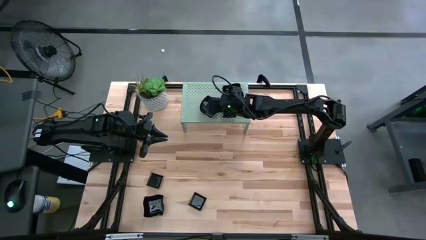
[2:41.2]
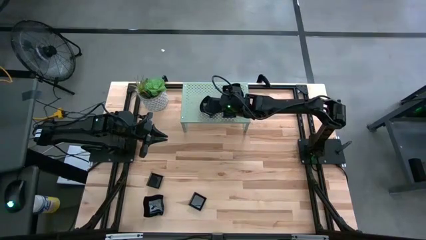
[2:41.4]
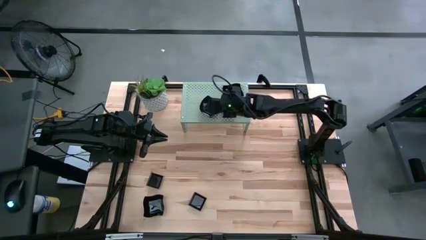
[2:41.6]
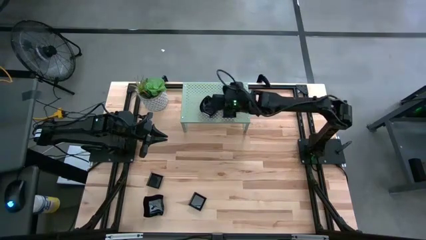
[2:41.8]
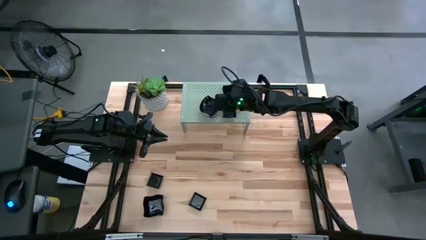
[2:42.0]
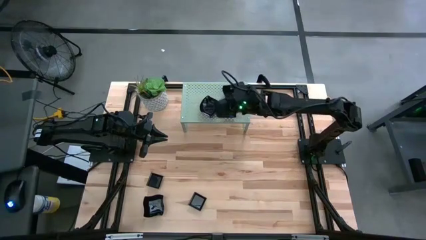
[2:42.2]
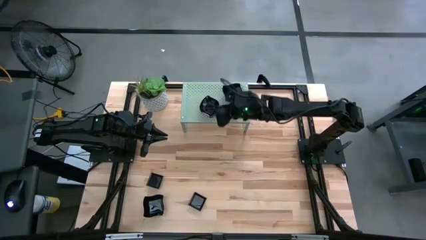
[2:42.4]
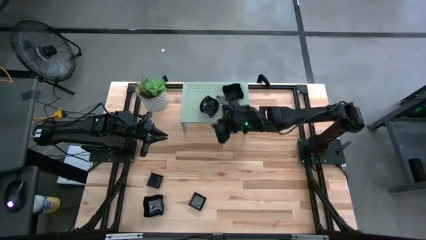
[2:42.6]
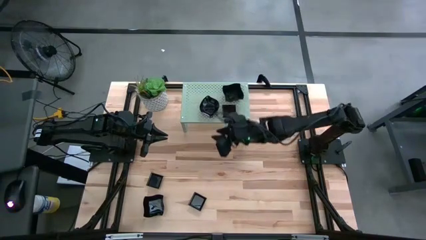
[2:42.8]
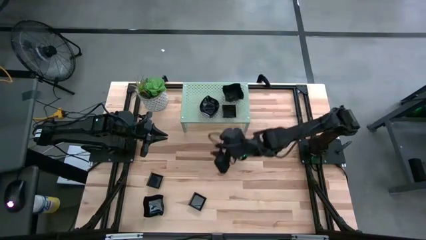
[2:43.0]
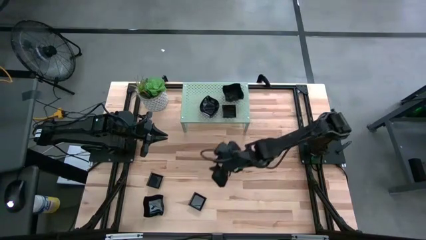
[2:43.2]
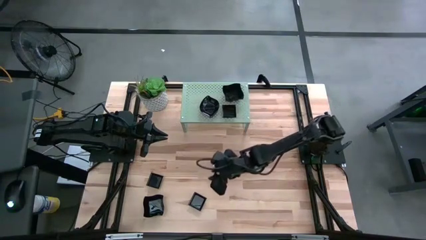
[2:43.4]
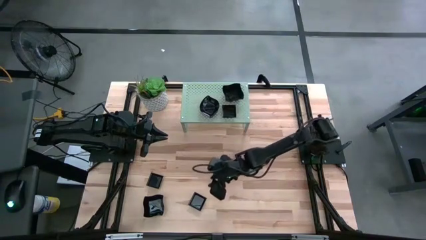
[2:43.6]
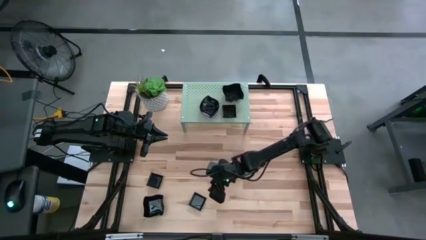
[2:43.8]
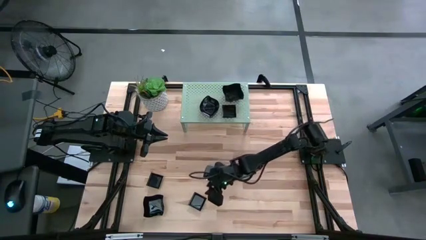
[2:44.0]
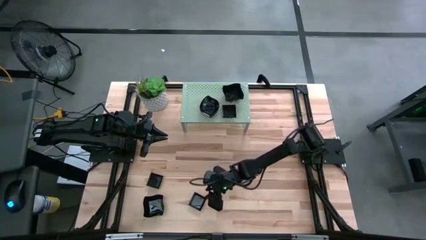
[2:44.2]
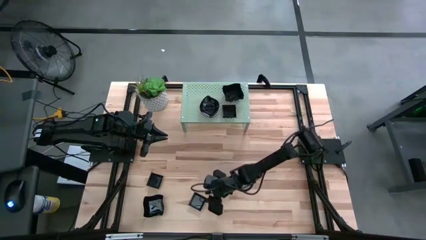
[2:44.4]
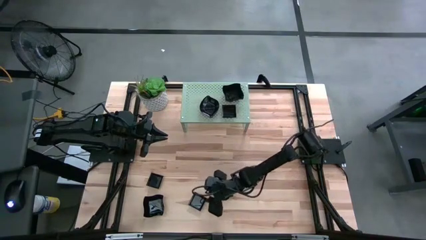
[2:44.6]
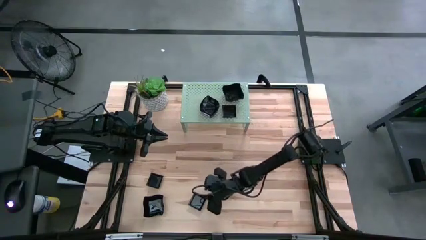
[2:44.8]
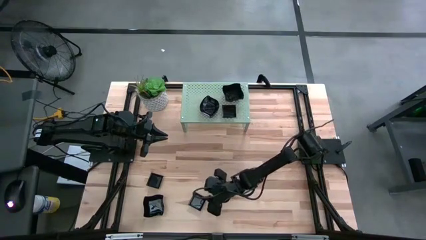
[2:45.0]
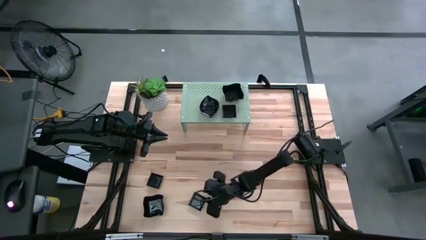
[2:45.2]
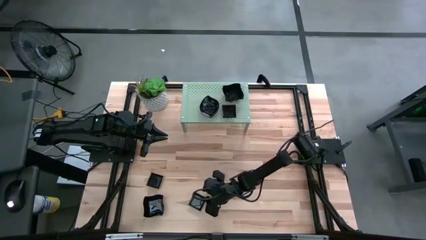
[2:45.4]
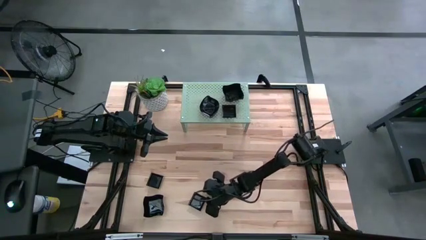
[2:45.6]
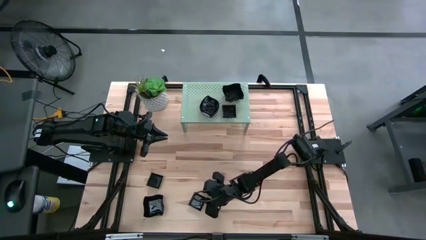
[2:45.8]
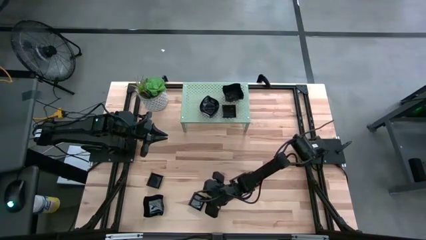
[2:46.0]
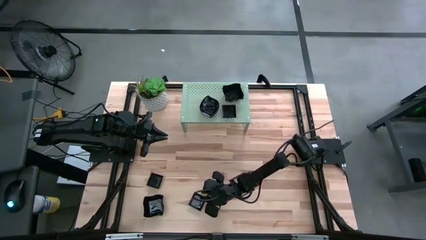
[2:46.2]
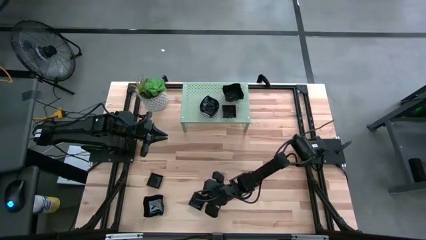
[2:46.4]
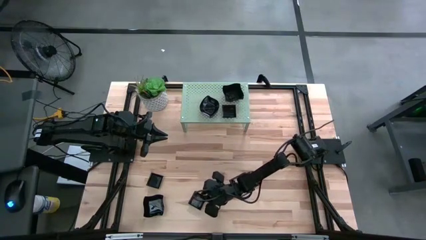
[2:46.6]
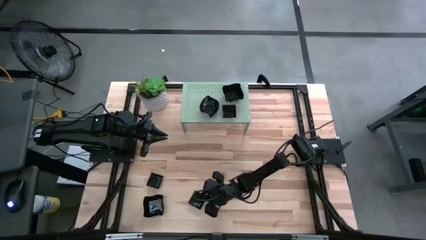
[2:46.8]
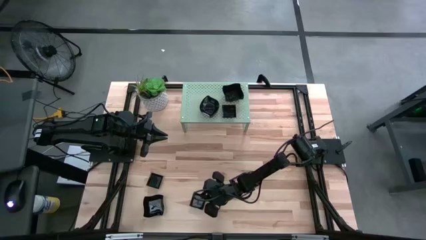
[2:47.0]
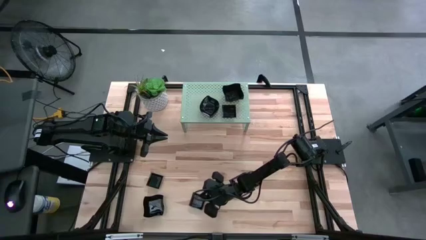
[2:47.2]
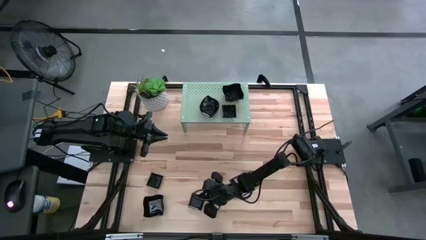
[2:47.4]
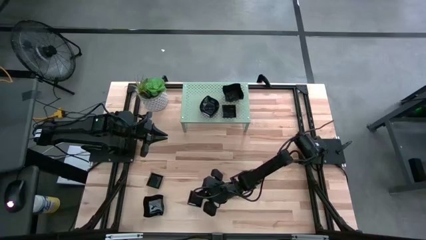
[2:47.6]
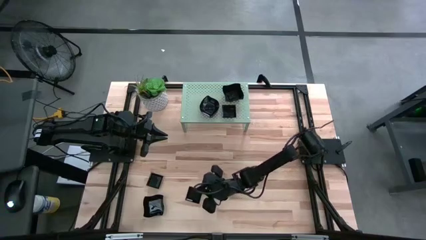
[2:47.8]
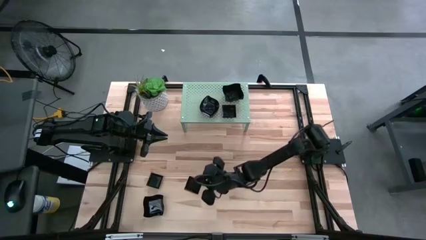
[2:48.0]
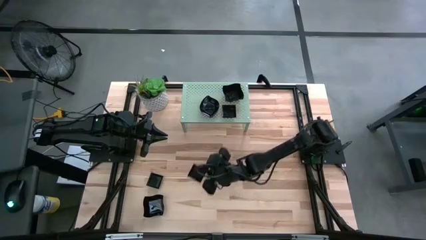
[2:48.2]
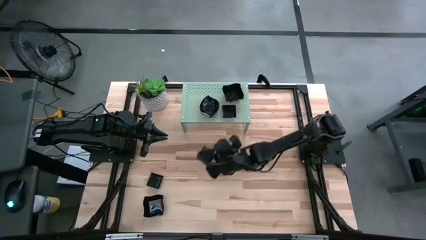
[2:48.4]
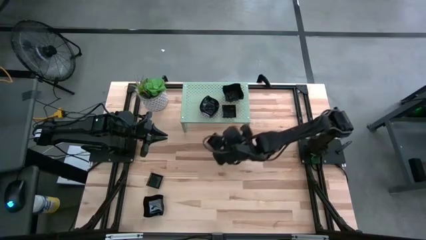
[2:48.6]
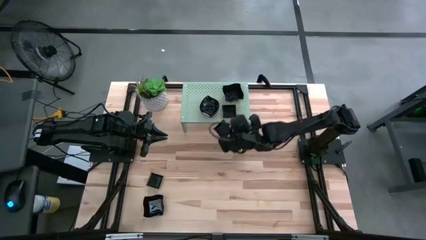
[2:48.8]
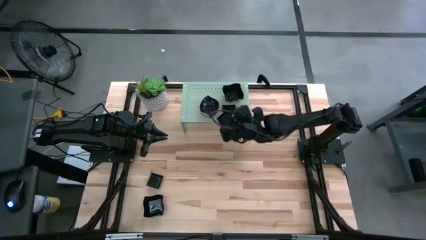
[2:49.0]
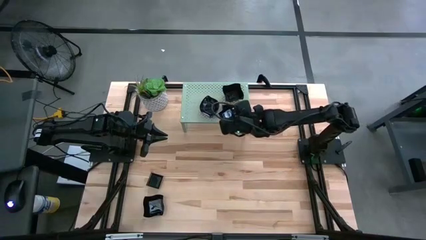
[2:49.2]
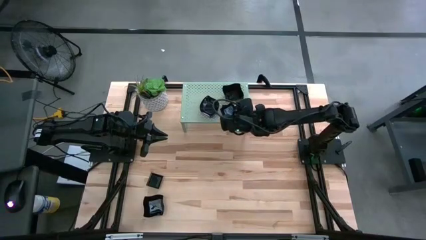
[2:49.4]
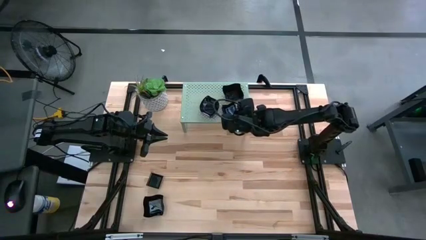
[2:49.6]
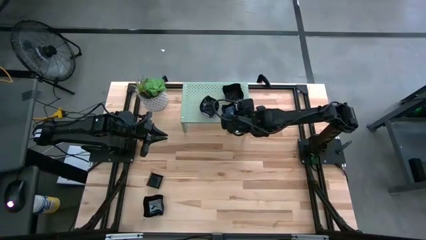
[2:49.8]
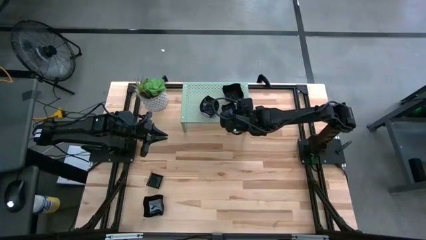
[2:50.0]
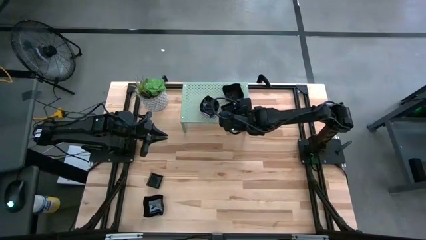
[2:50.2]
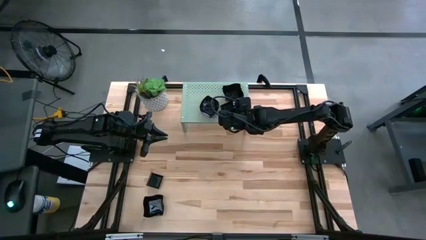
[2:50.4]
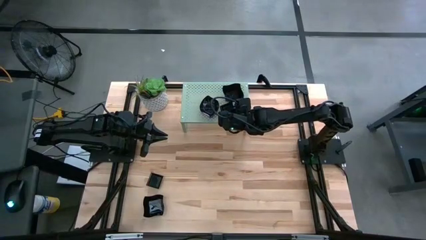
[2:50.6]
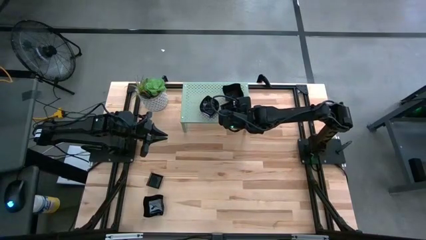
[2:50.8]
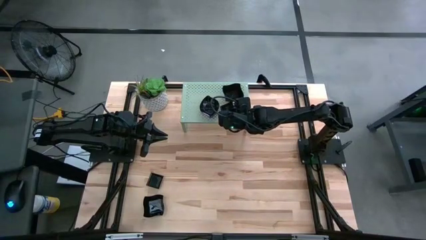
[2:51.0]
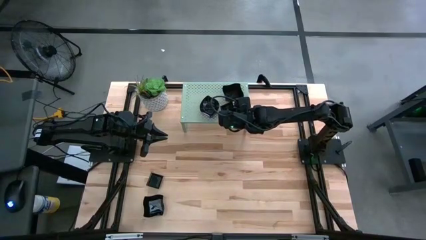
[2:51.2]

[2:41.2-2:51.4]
Task: Pick & Place Mini shaped plates
Stack the square plate on top of the square plate on the shelf

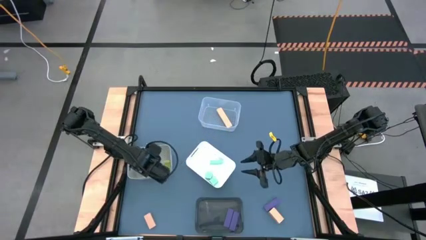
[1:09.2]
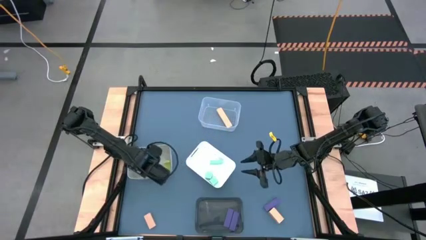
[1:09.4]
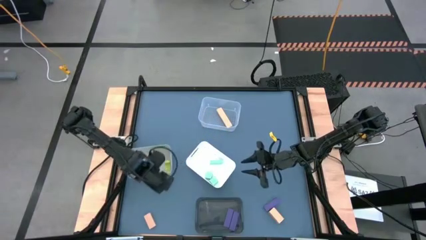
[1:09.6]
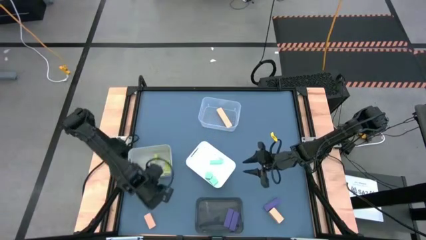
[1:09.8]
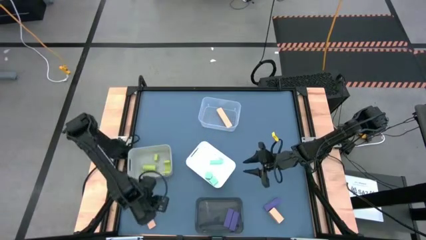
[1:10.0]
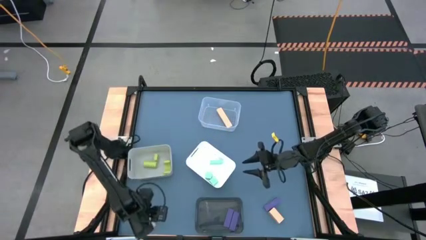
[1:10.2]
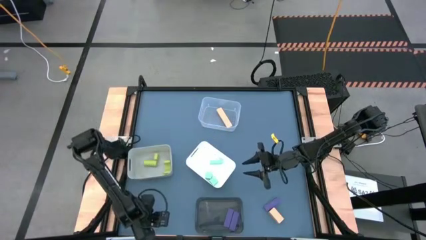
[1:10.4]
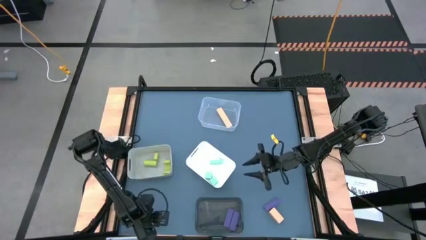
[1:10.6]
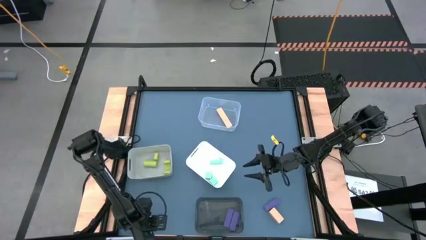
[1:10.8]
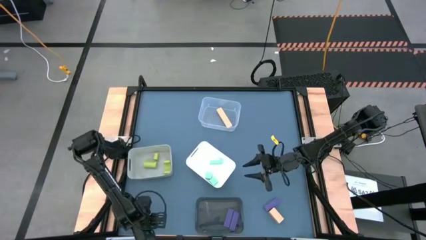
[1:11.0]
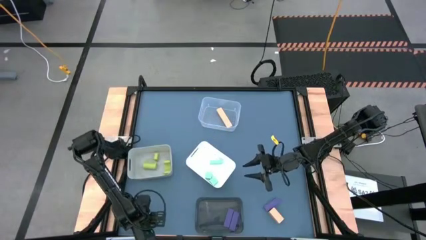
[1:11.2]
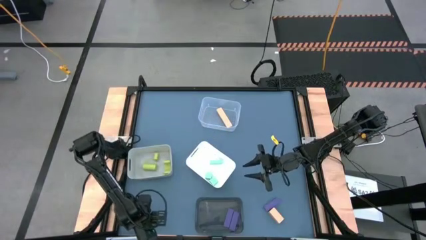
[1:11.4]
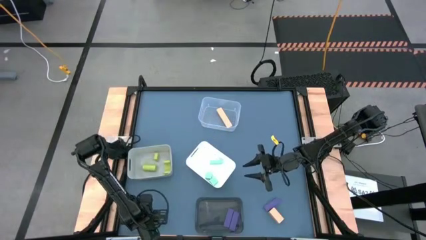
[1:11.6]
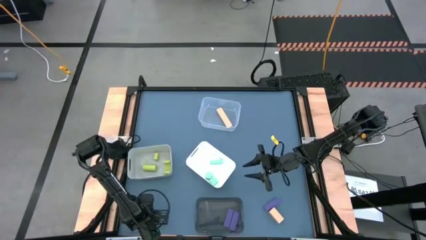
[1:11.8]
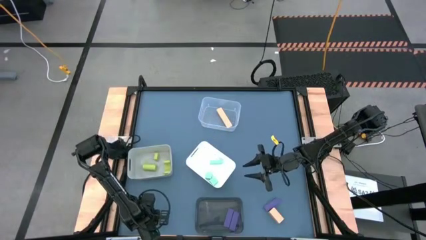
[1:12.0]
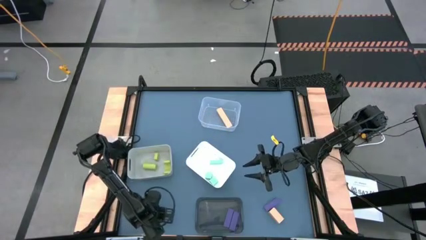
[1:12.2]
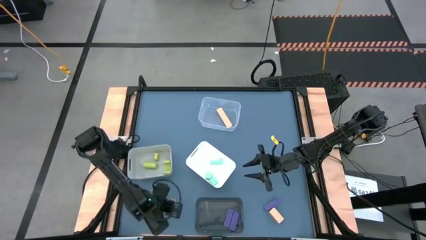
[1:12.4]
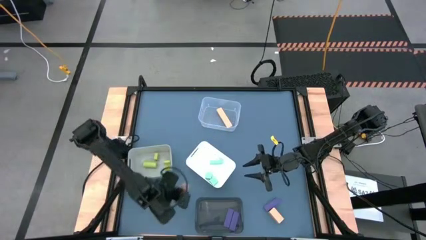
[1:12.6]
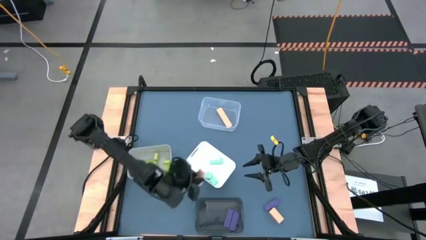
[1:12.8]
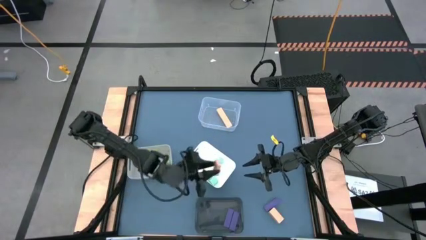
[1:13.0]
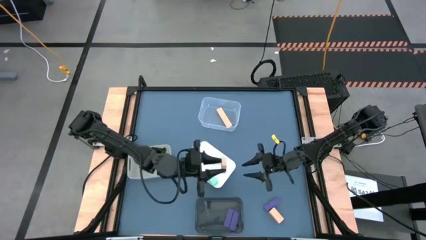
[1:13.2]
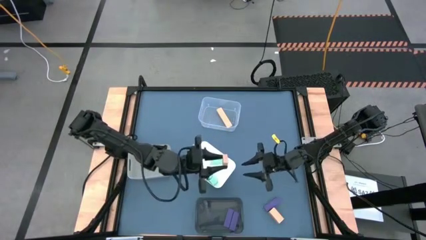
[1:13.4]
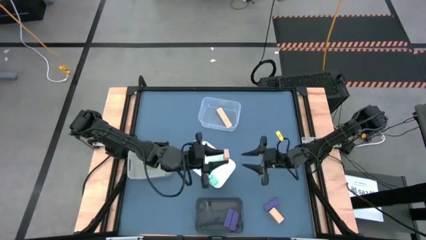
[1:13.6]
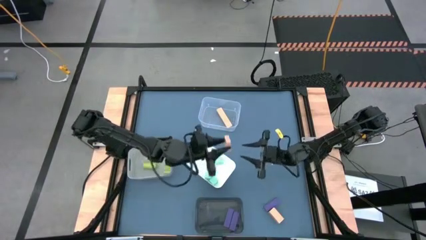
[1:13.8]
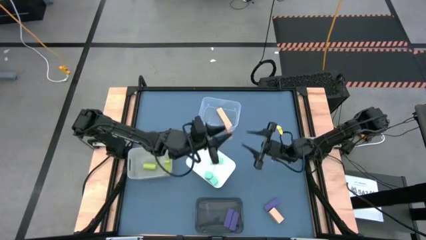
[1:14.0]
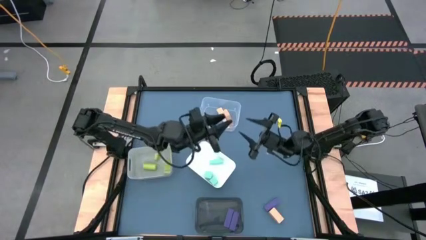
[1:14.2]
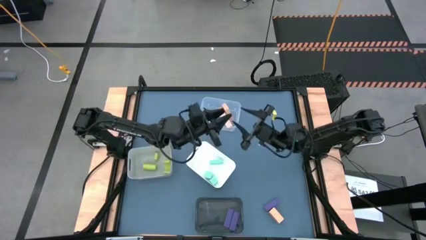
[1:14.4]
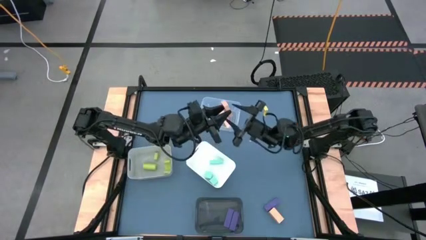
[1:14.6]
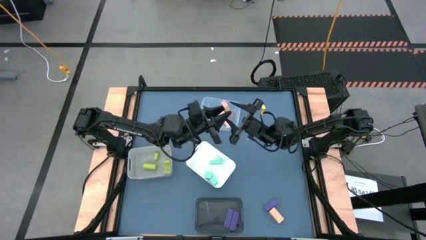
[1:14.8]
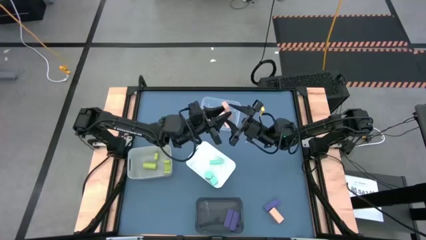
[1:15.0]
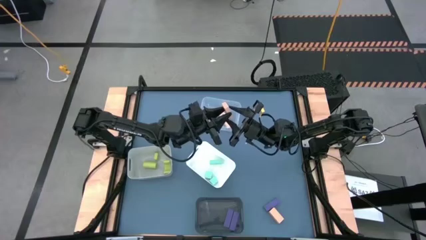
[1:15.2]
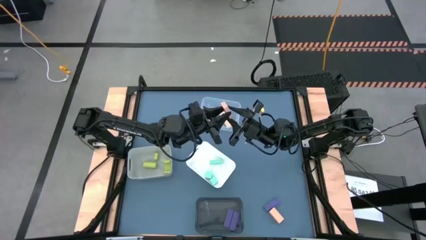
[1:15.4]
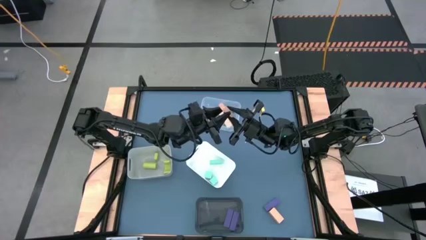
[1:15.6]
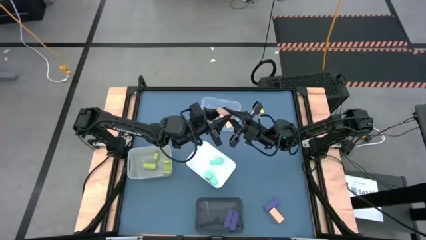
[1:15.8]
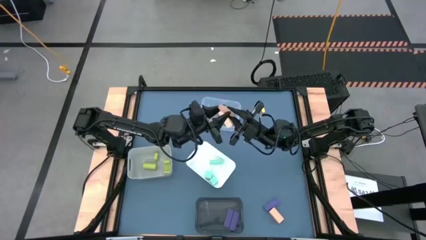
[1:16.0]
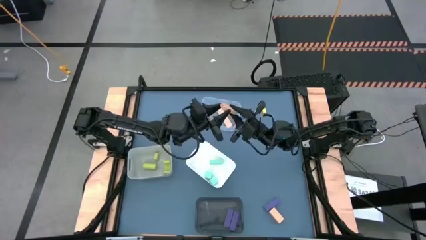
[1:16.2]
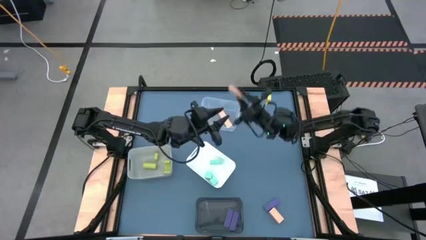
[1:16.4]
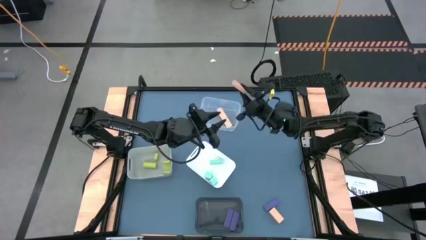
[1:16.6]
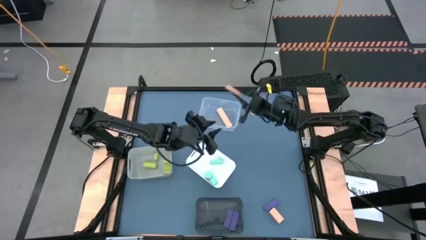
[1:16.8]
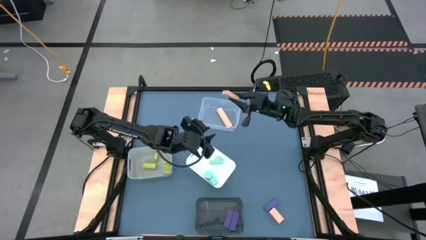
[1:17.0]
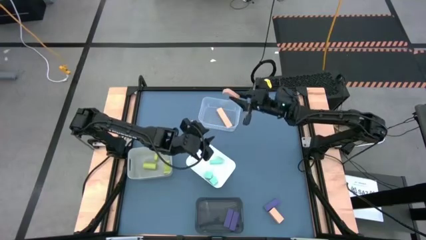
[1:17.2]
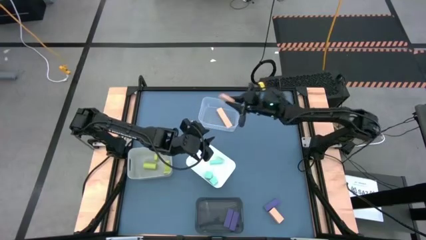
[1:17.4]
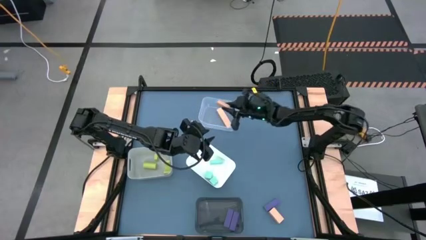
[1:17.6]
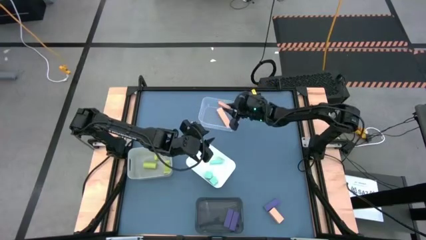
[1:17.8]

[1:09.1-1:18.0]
Task: Sort & place blocks by color
Put the left light brown block into the transparent bin
